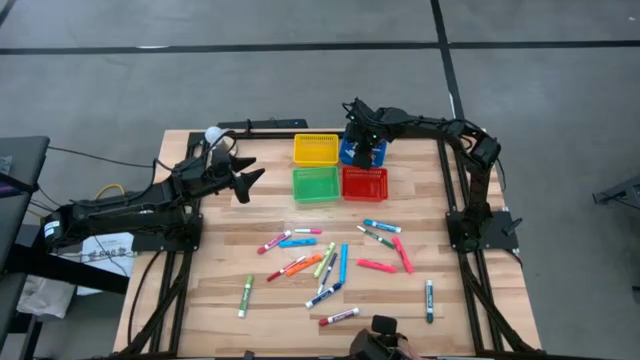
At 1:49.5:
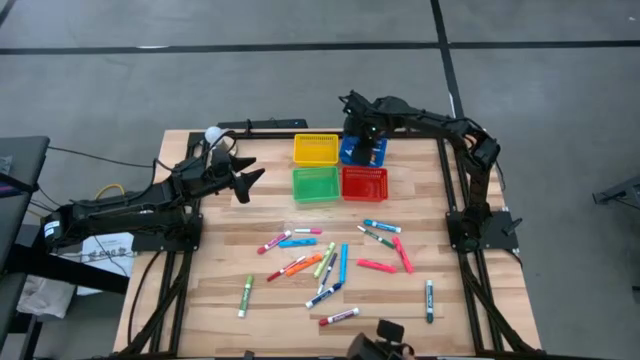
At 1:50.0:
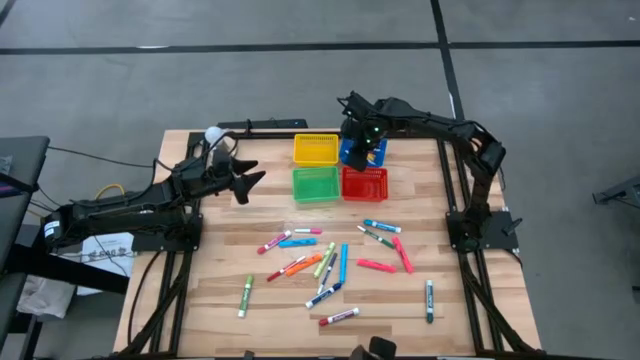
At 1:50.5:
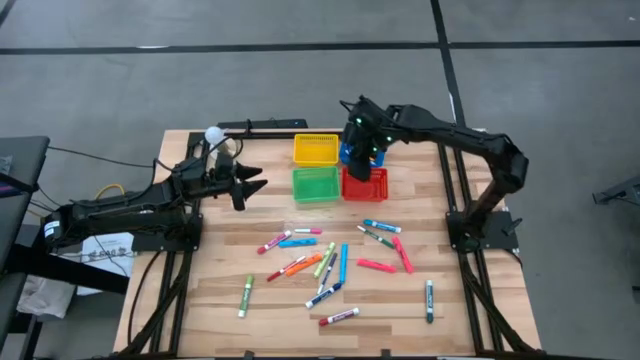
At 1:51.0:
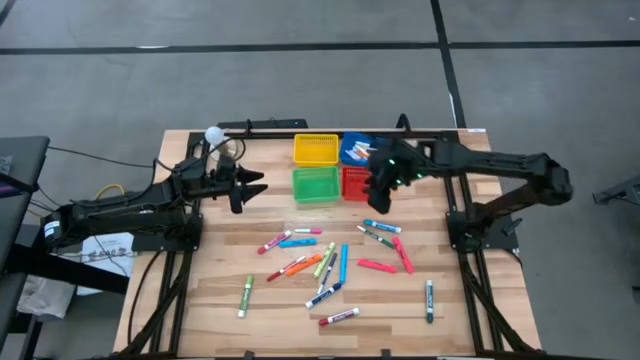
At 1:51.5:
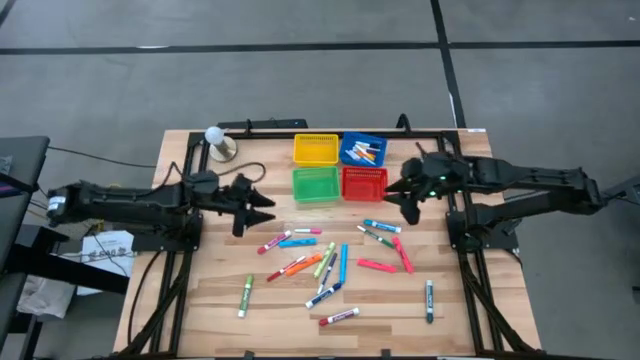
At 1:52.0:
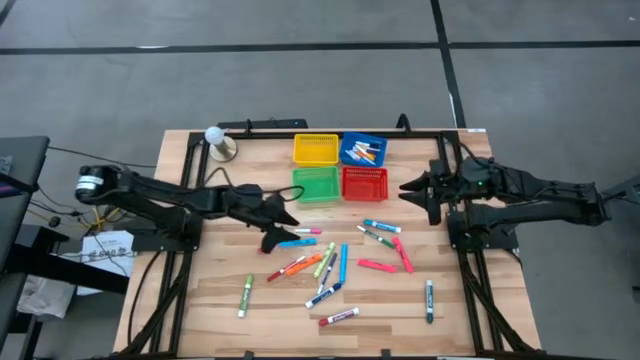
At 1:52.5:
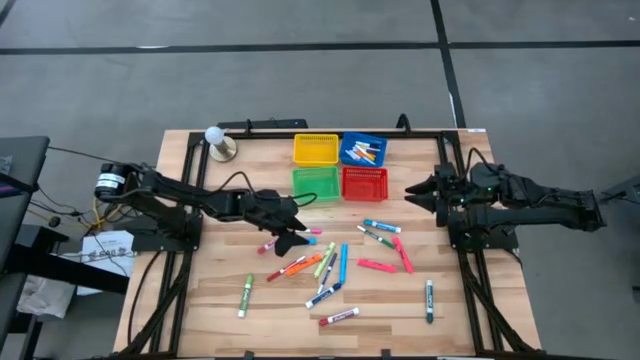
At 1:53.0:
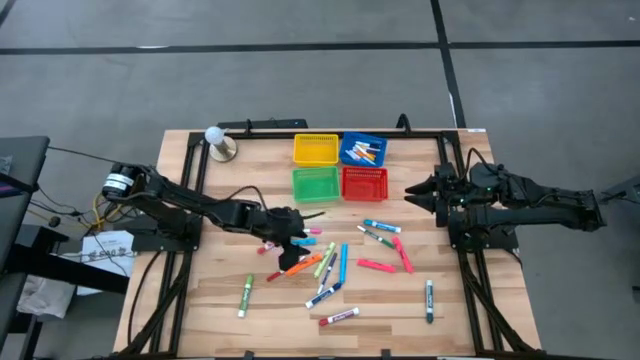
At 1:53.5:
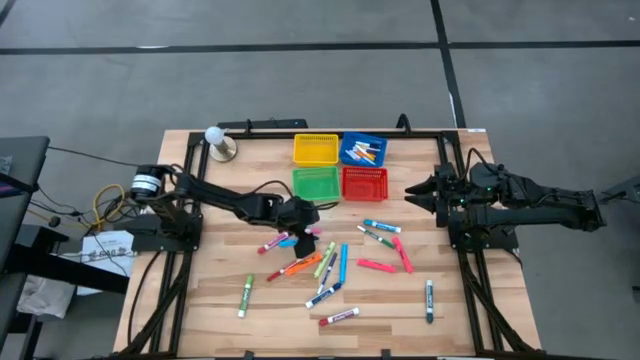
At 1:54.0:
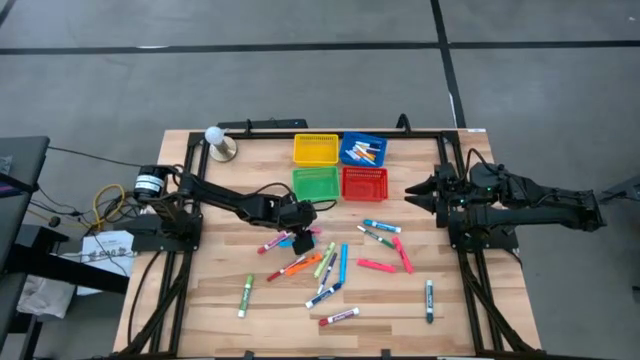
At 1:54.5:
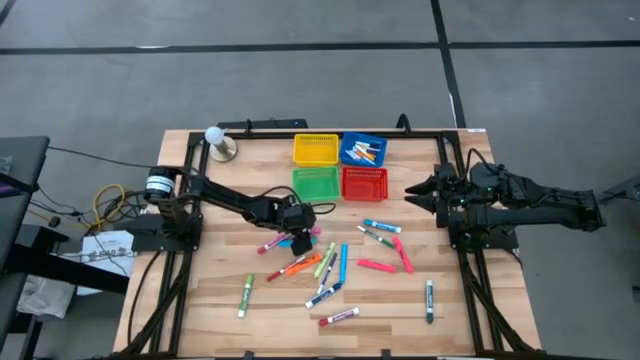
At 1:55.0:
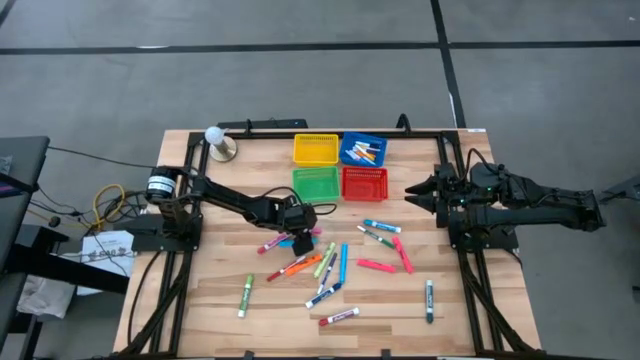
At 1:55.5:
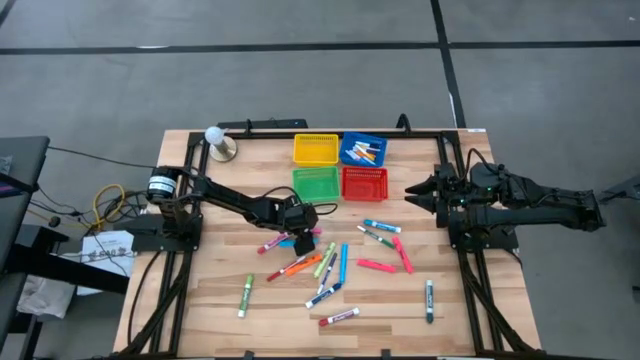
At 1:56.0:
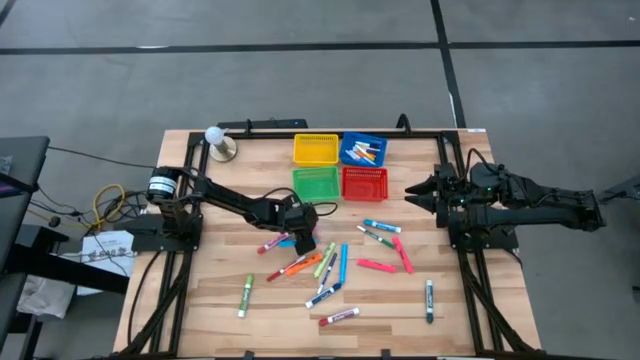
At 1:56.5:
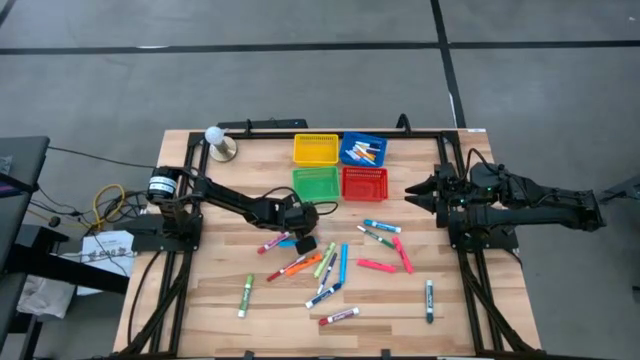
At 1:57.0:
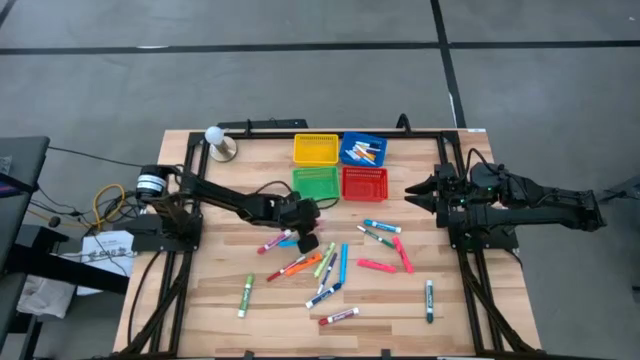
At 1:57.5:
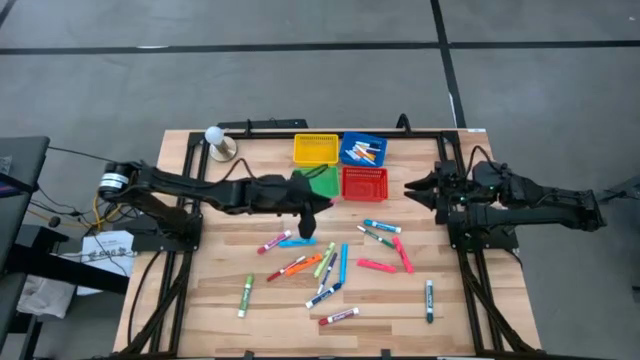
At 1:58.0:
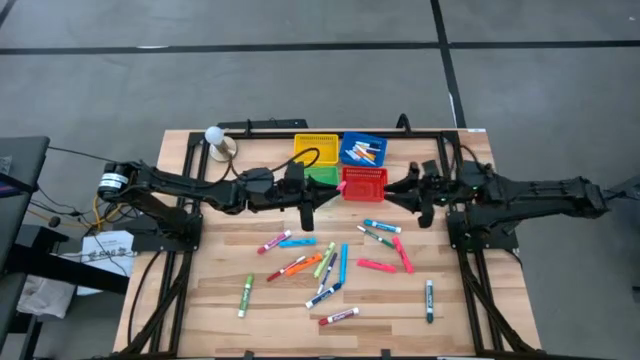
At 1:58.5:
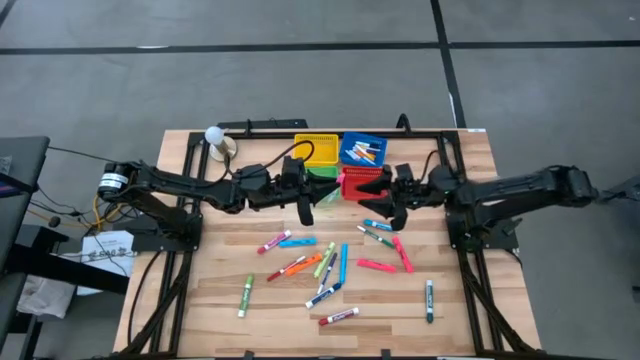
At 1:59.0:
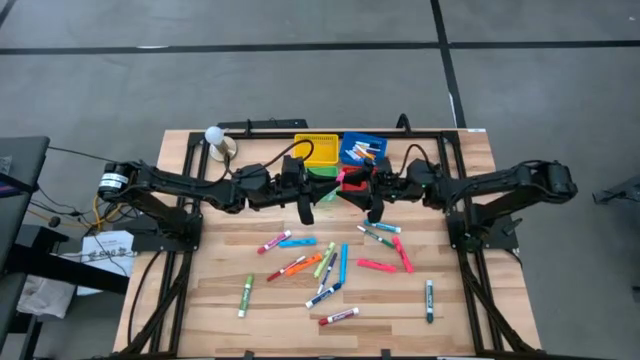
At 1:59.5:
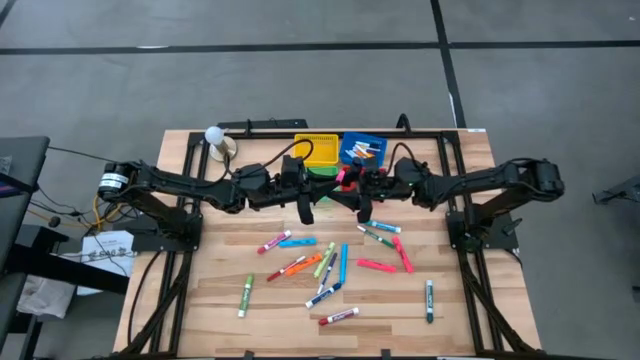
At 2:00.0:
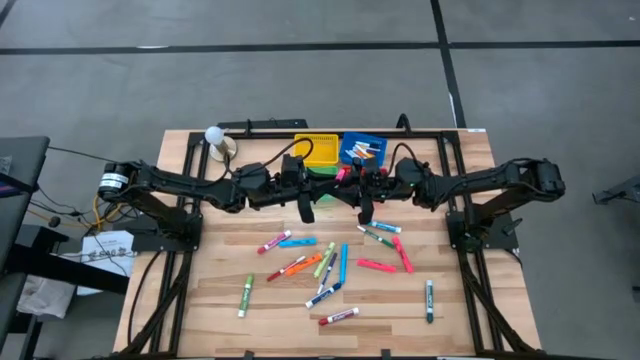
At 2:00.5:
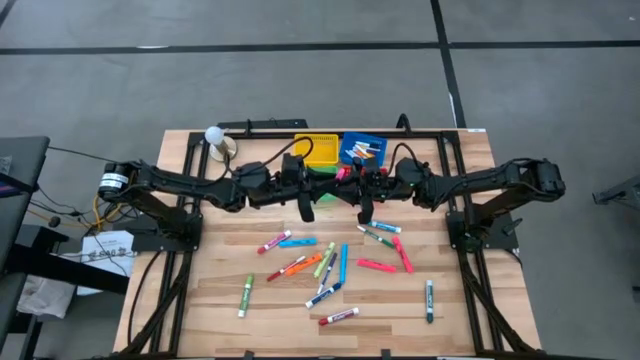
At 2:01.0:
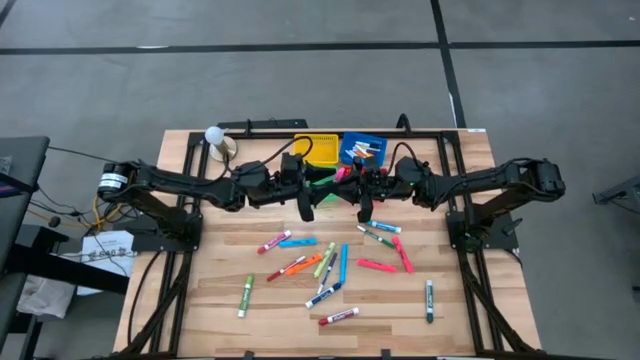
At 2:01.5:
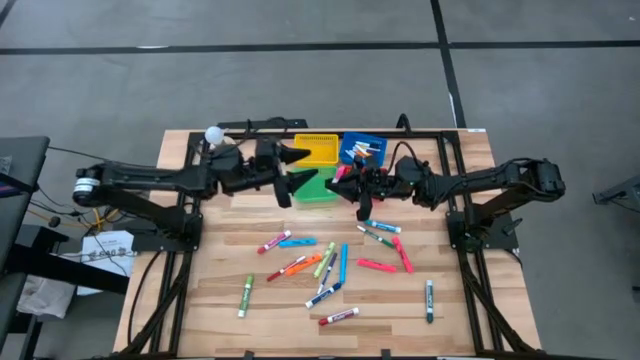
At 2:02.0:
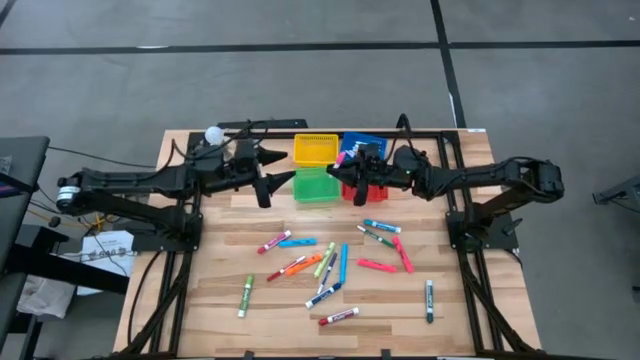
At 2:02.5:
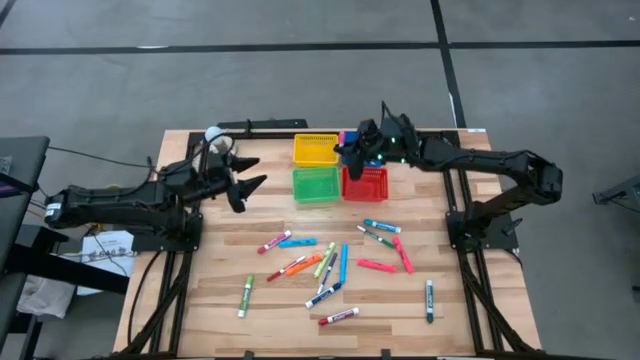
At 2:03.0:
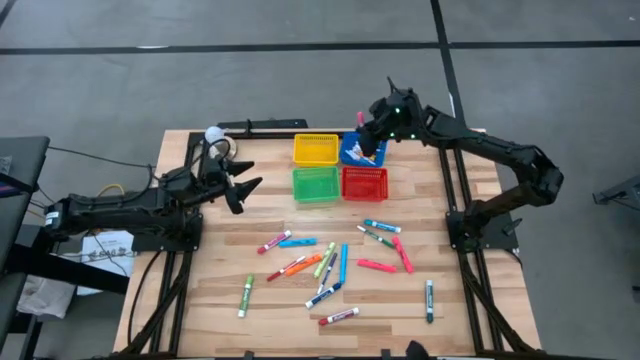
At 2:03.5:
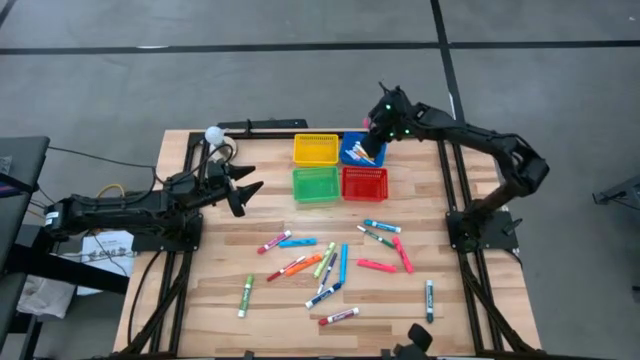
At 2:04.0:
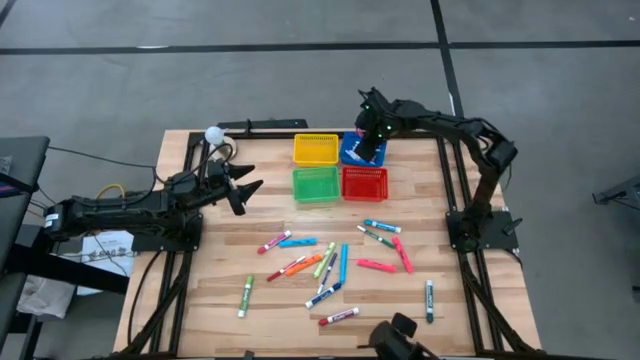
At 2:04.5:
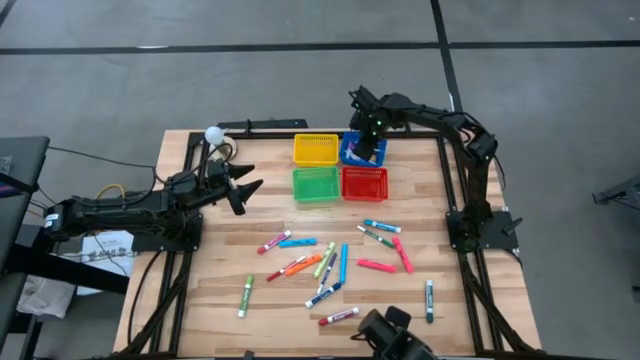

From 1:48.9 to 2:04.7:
Task: Pick & Place Markers
Put the pink mini marker into the blue bin

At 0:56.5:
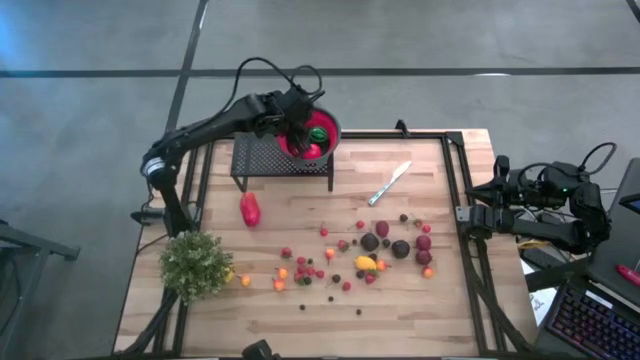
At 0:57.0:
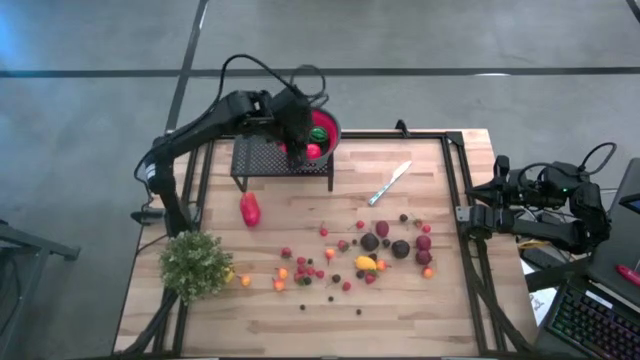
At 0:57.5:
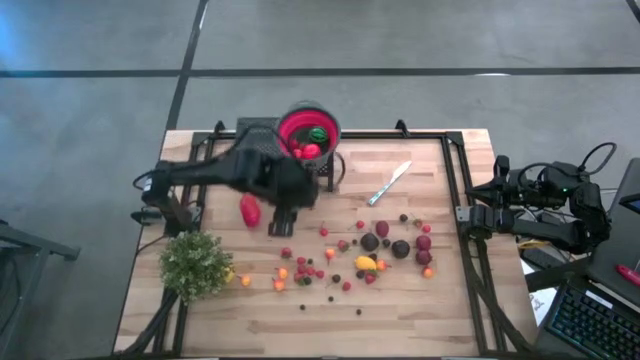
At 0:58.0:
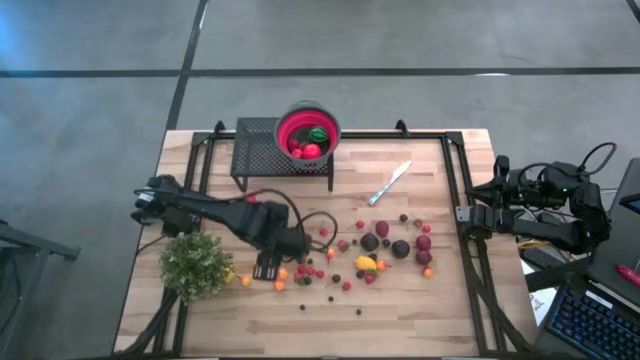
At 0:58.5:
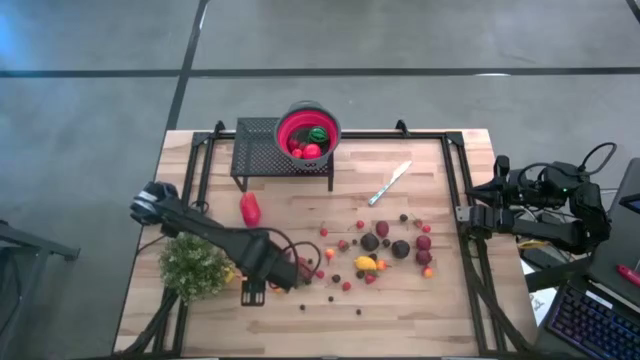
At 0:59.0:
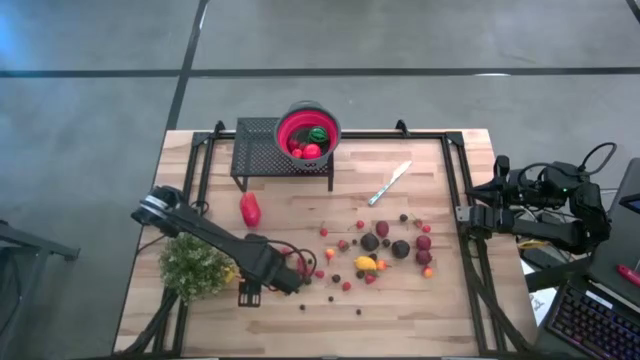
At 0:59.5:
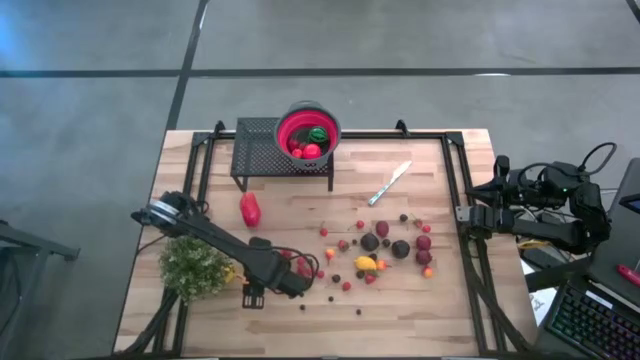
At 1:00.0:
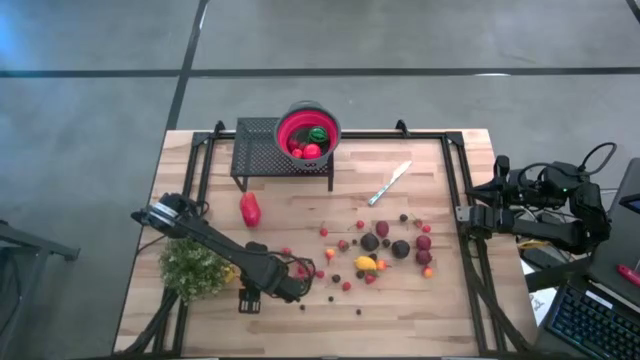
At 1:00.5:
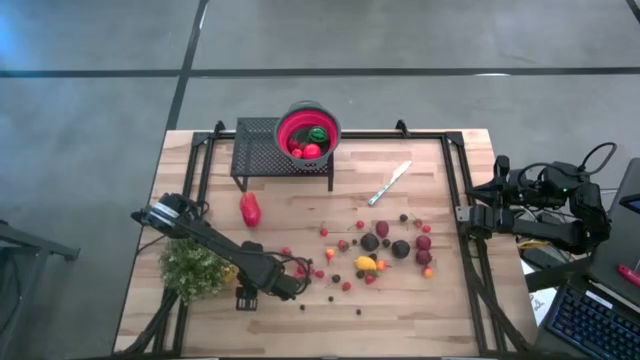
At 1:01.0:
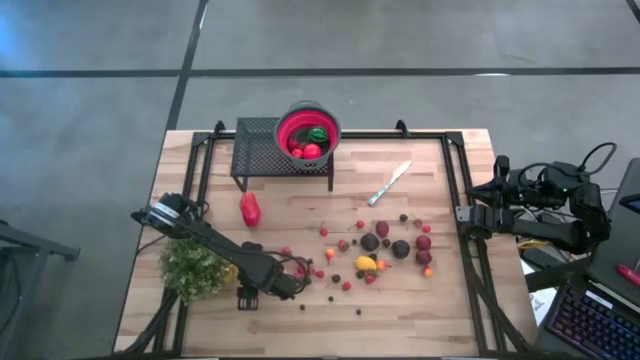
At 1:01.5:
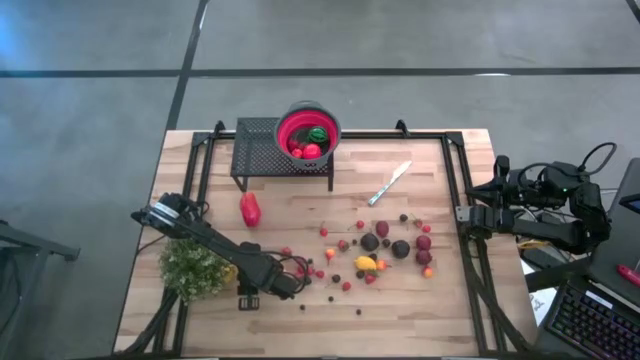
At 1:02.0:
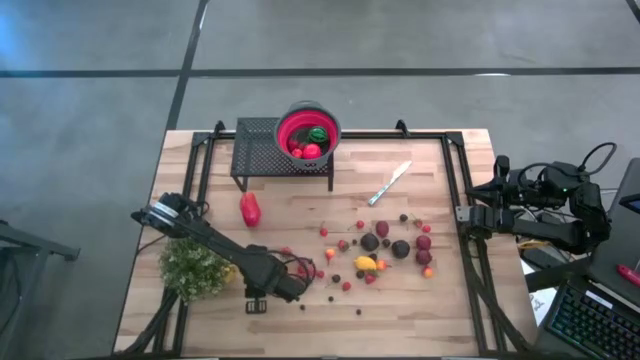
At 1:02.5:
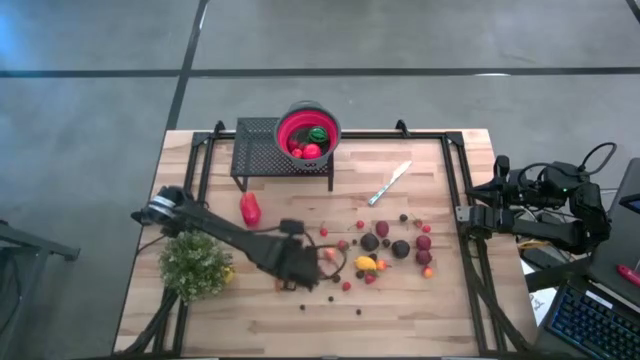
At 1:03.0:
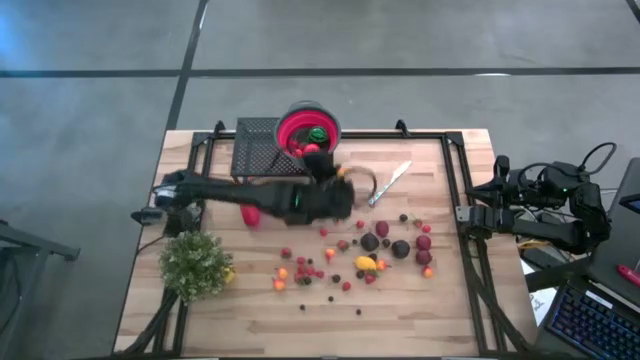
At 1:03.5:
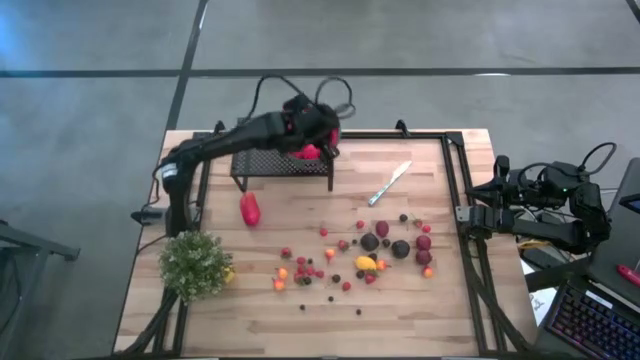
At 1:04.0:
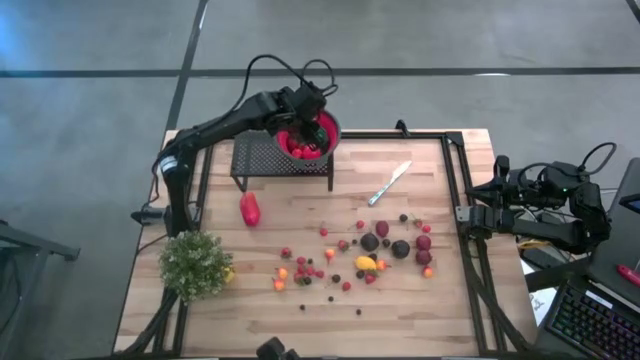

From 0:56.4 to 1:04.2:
Task: Pick & Place Fruit
Put the orange pear into the red gray strainer bowl on the shelf
